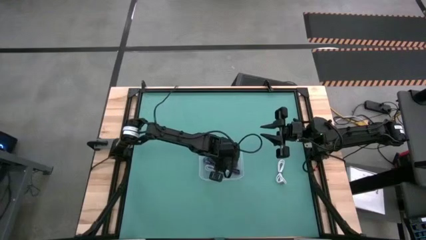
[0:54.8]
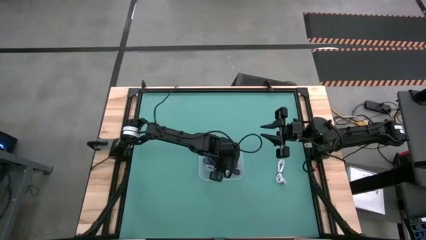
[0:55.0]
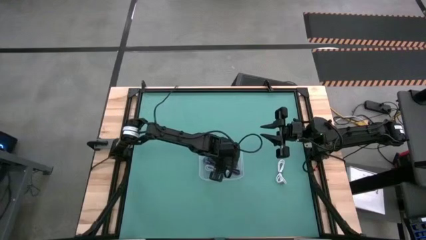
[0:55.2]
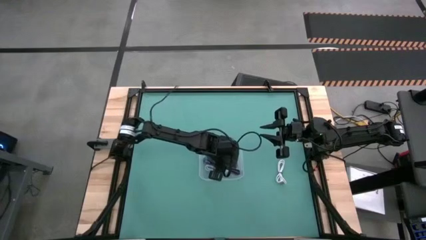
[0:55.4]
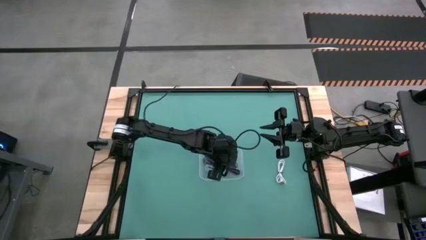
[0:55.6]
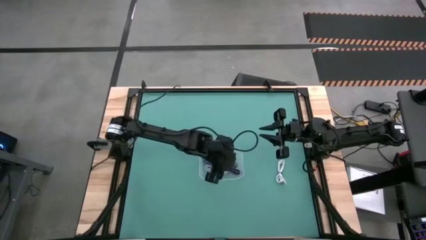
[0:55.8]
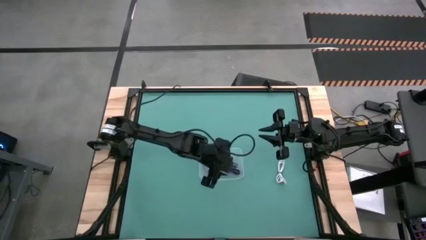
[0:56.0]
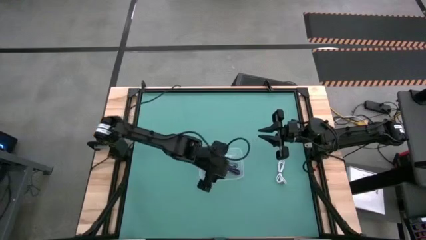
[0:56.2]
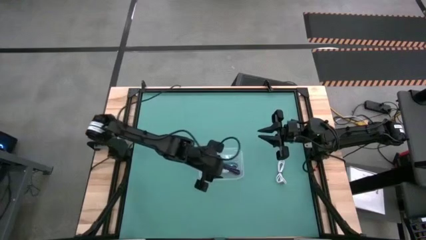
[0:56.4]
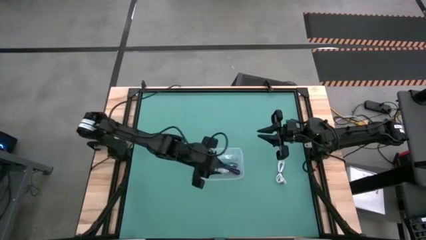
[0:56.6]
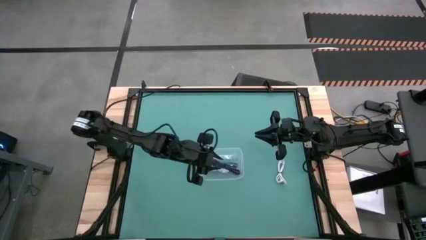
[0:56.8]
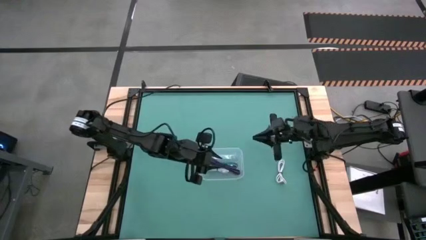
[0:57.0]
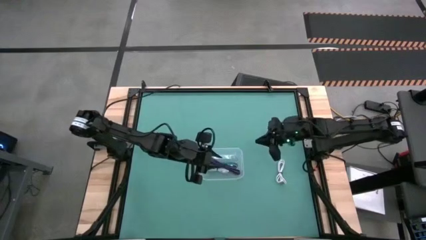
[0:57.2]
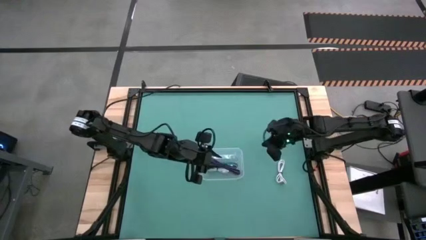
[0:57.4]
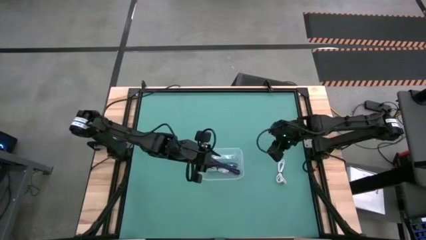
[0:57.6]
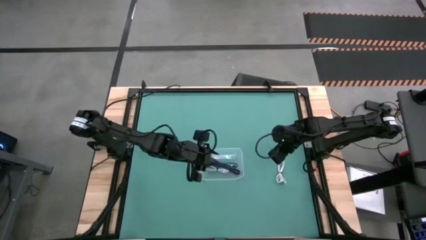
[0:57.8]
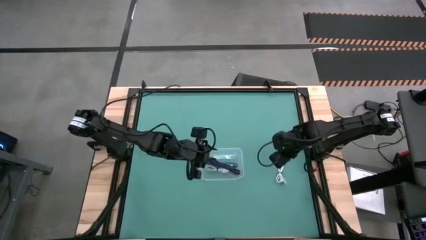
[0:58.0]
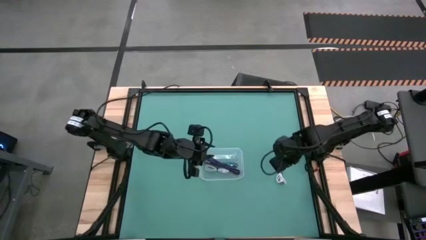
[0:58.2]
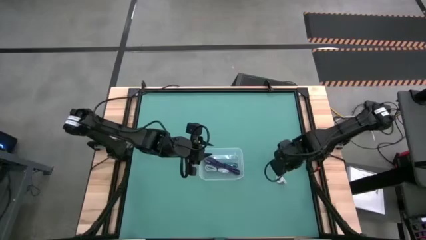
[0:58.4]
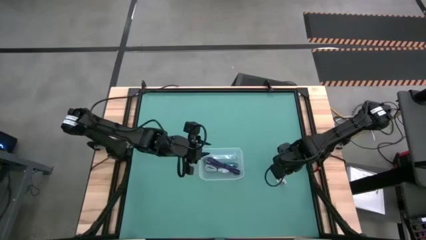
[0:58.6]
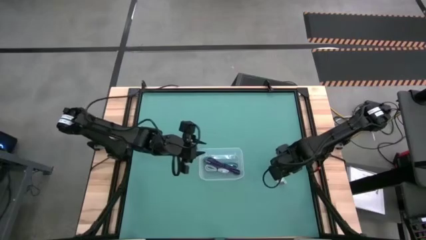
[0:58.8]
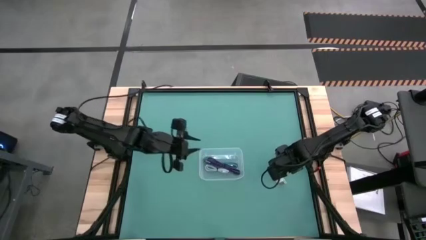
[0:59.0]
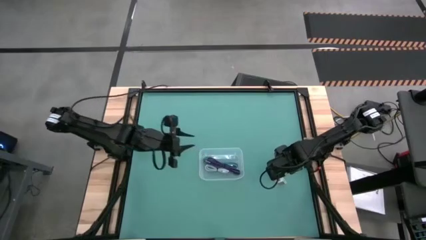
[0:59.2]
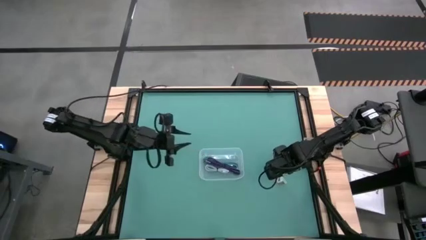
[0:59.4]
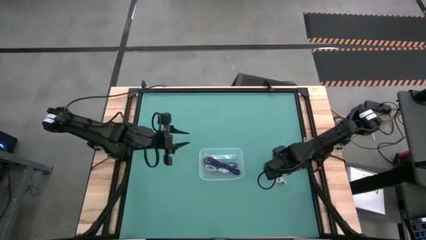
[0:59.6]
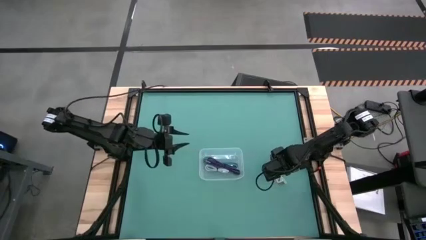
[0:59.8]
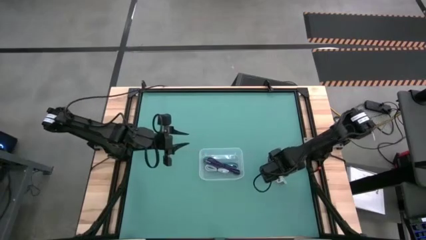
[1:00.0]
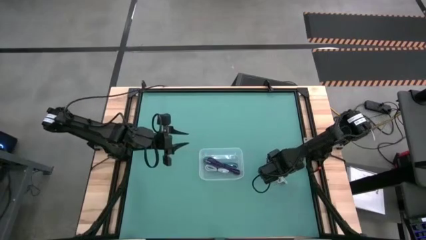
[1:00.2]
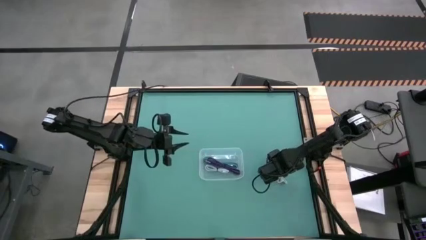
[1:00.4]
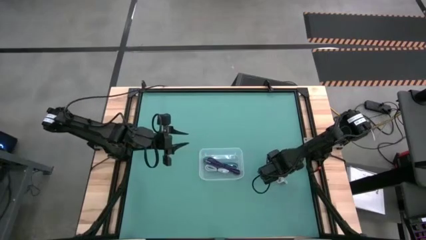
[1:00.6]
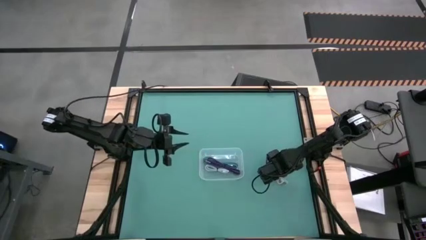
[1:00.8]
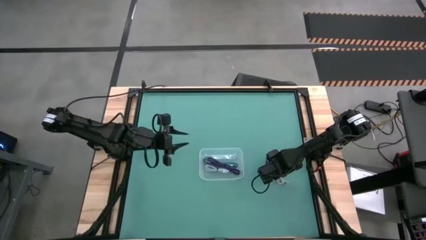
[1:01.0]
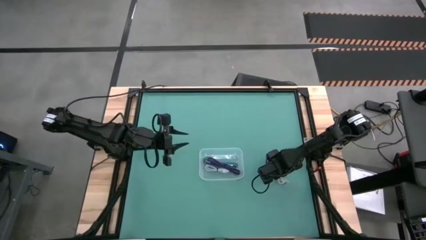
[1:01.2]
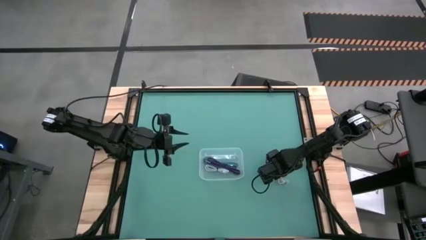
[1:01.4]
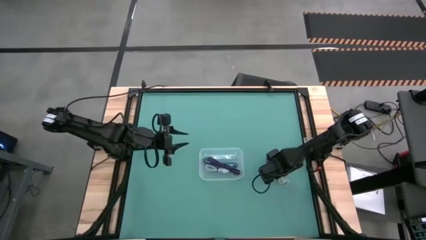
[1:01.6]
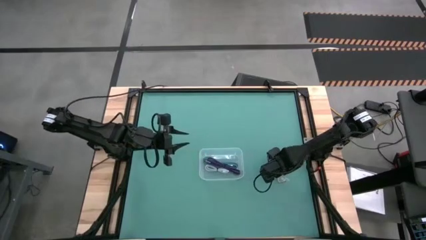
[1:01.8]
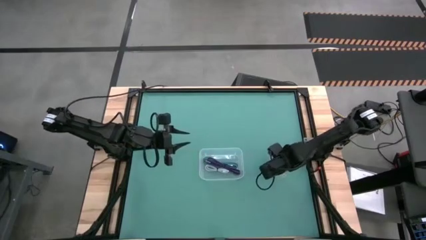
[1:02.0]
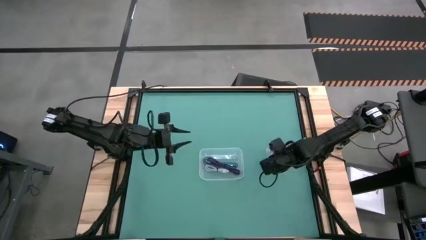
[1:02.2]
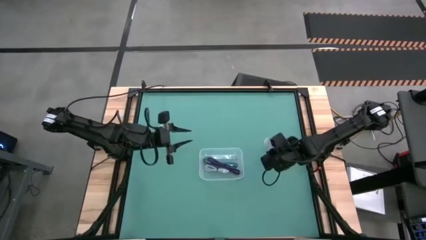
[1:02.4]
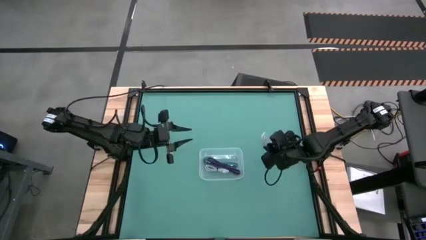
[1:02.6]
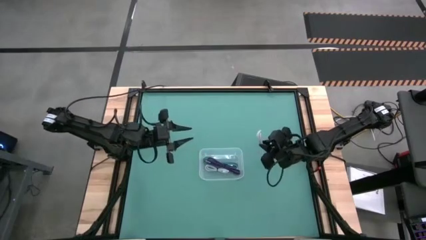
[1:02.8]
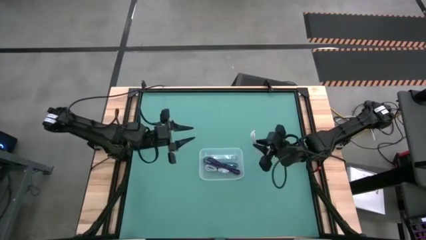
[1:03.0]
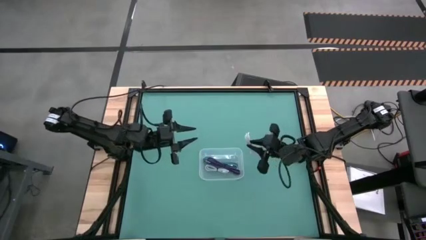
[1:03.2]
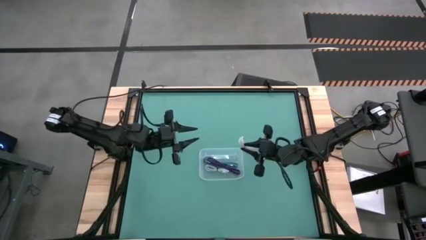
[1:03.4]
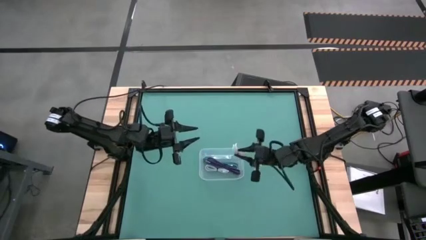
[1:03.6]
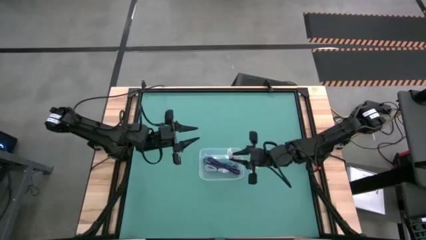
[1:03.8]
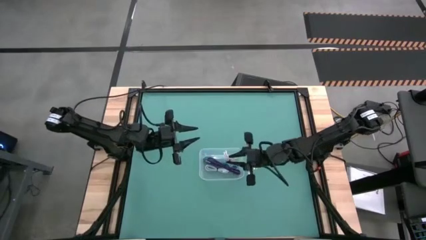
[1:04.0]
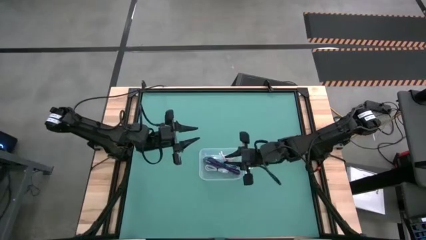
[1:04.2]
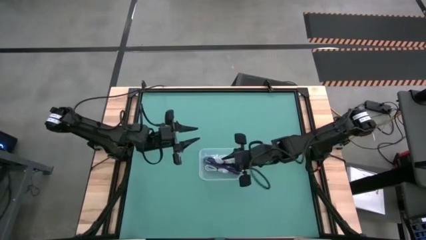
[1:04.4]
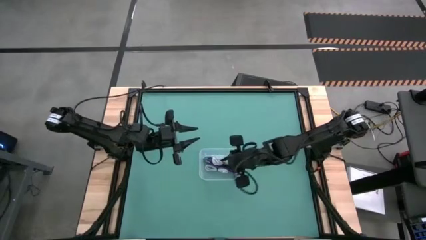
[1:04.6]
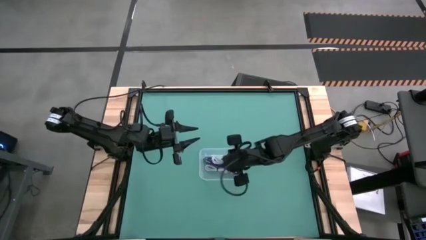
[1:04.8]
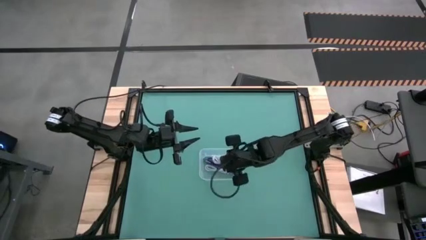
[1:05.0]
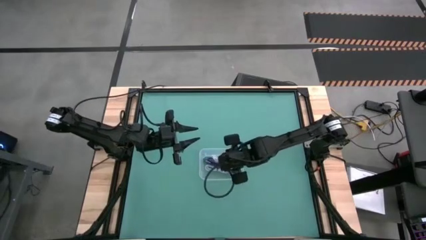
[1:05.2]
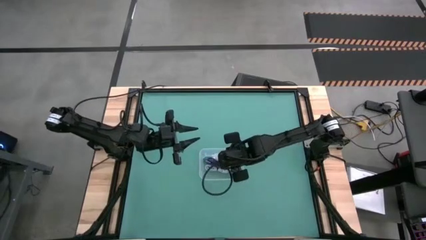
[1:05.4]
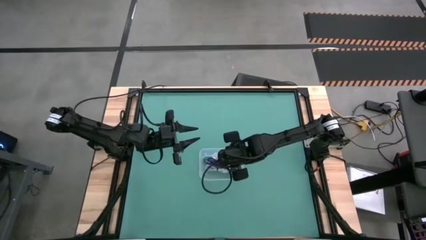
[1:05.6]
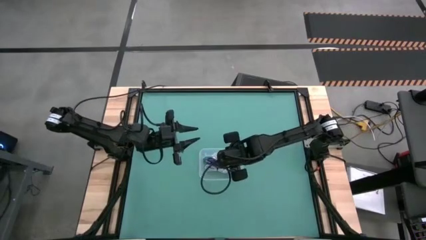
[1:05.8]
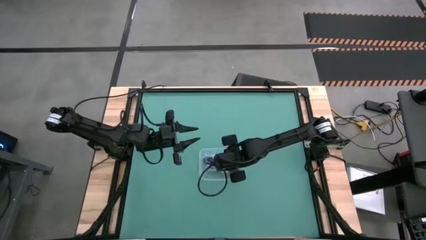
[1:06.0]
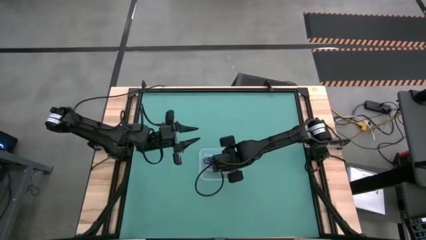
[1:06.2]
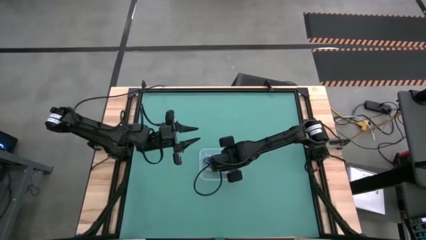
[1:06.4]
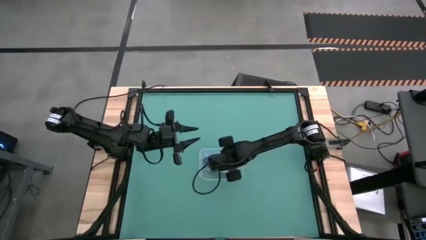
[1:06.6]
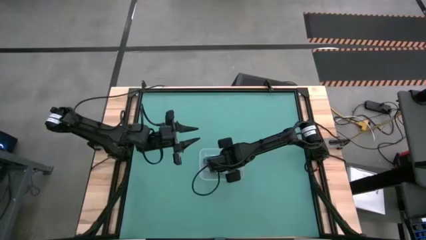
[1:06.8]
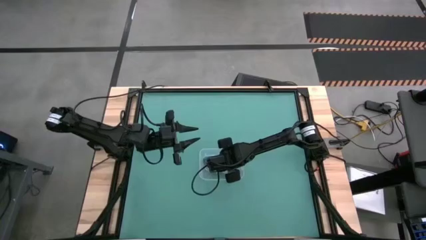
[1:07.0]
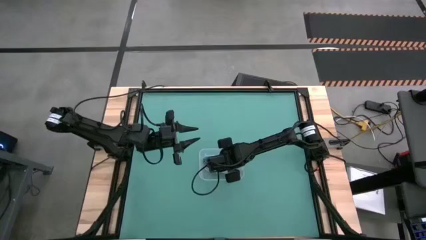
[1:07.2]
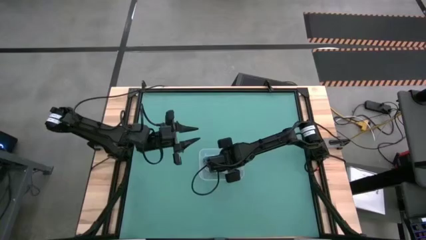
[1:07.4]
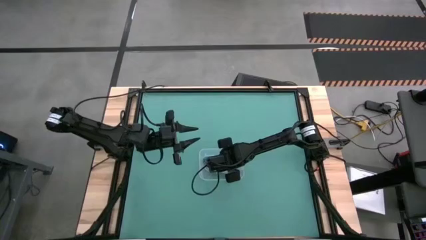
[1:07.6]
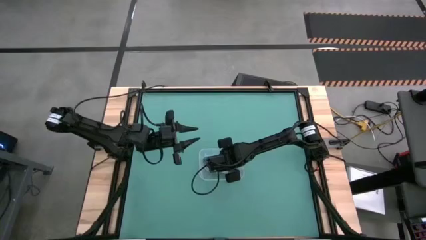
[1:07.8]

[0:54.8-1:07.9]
Task: Pick and place USB-C Cables
Put the white charger cable into the transparent bin
